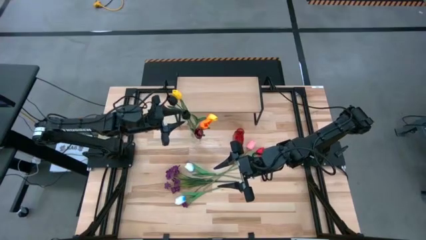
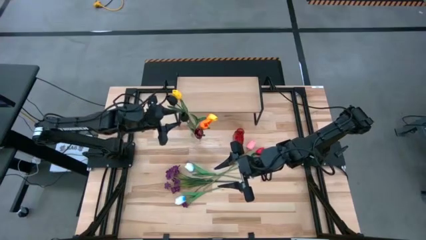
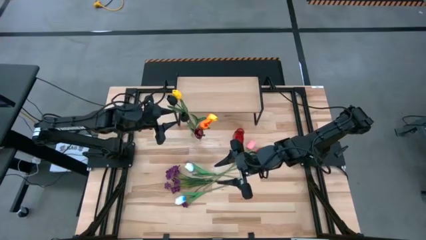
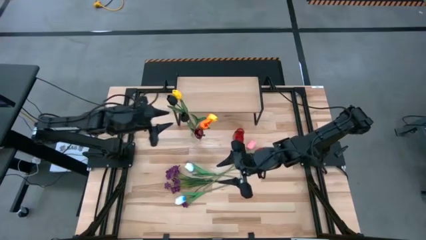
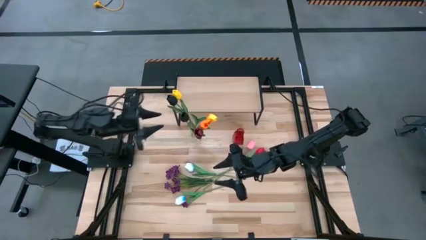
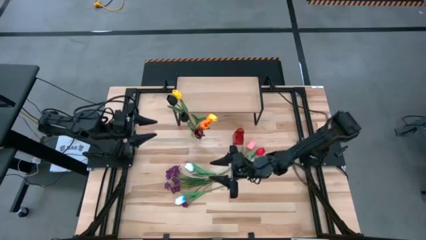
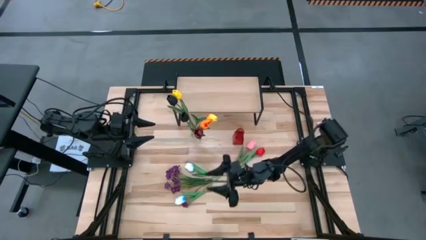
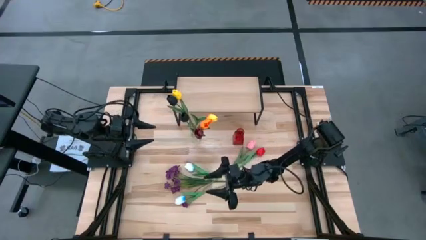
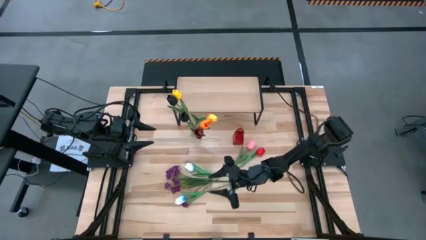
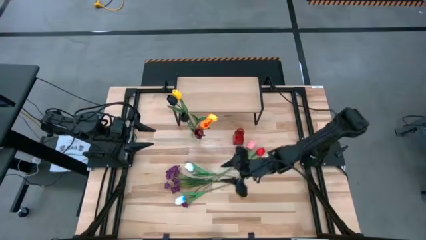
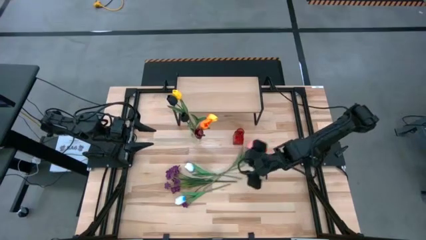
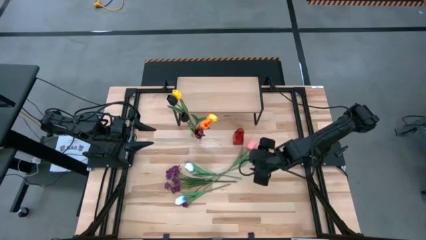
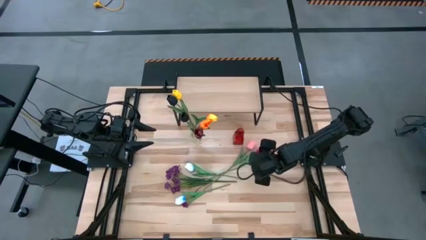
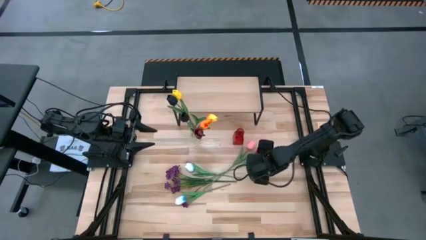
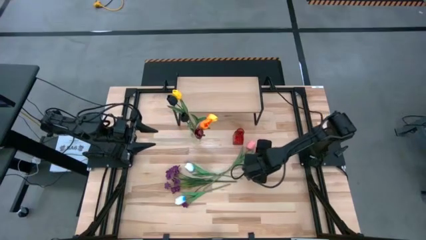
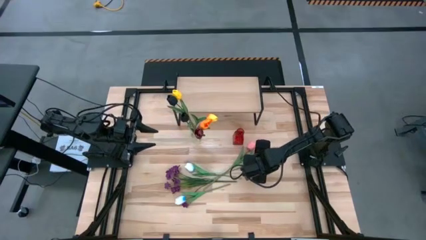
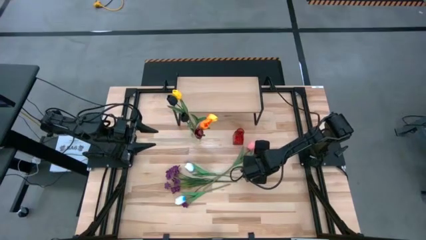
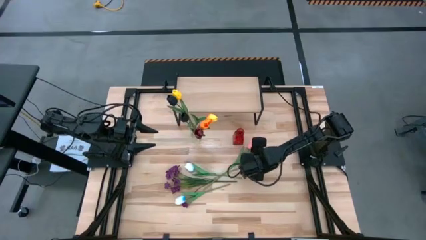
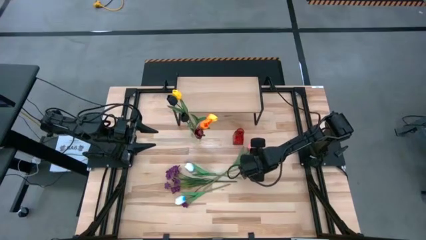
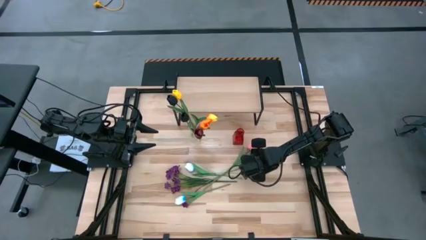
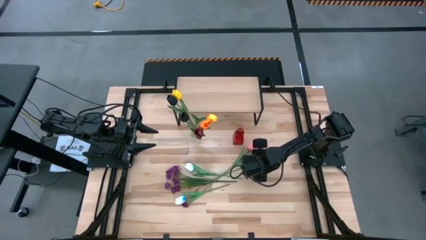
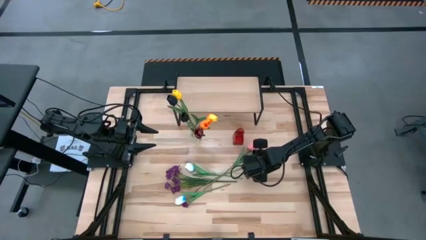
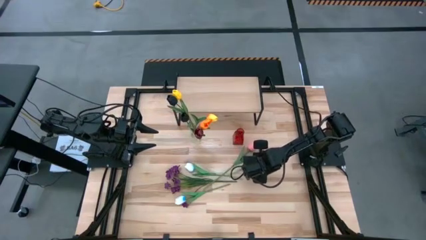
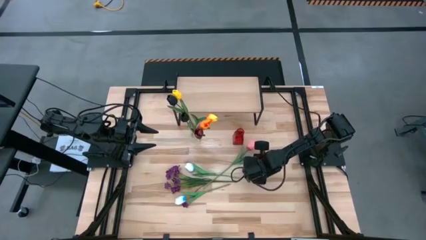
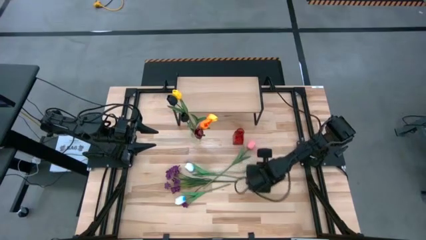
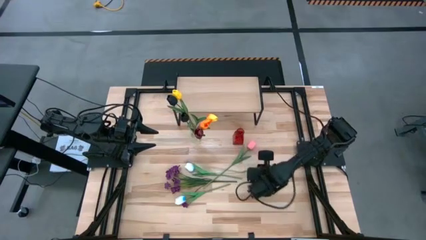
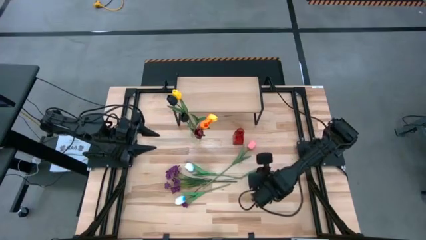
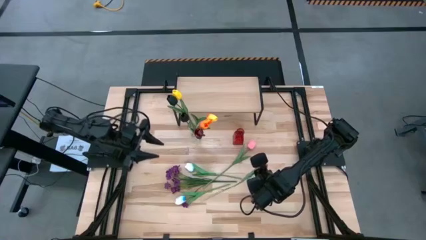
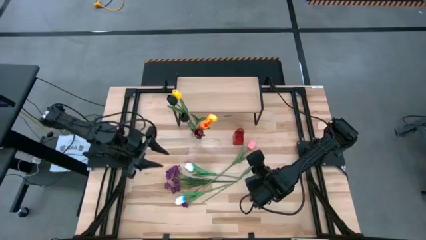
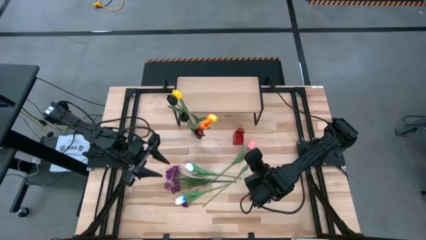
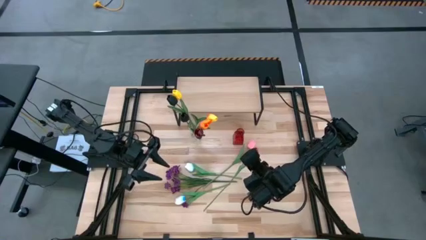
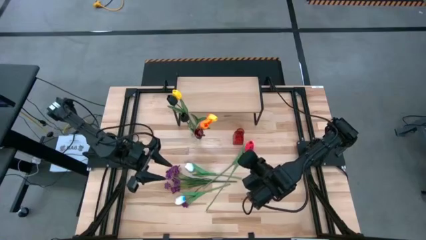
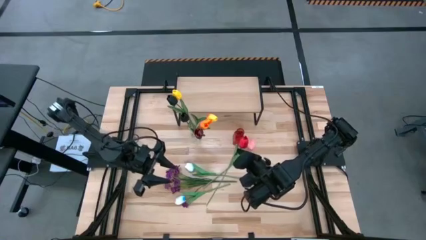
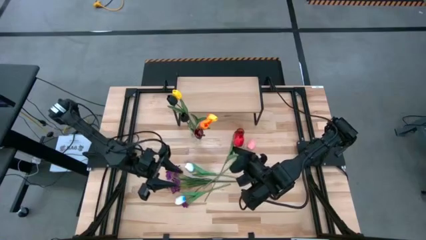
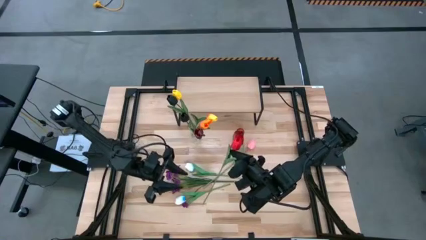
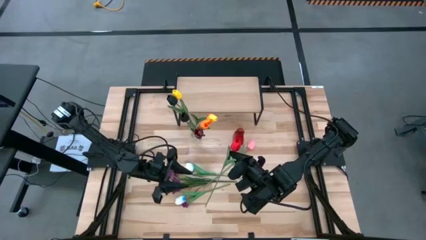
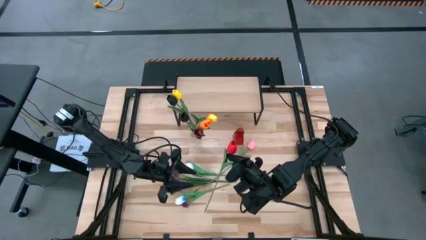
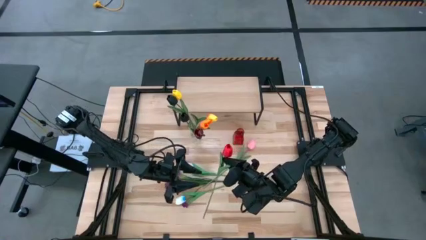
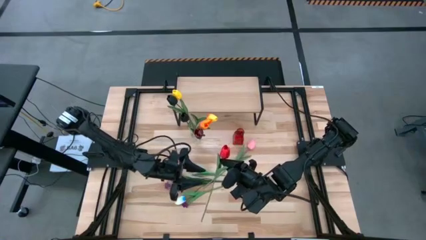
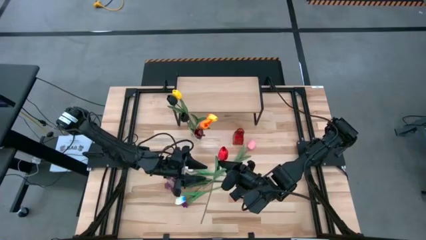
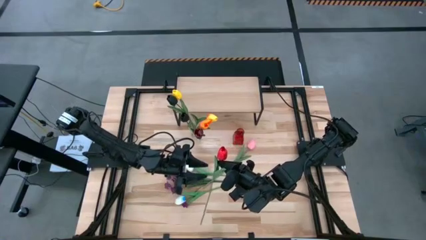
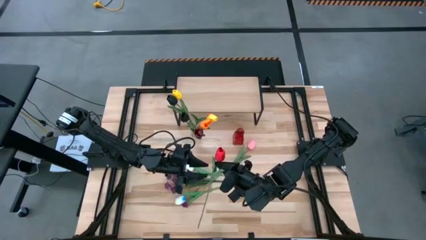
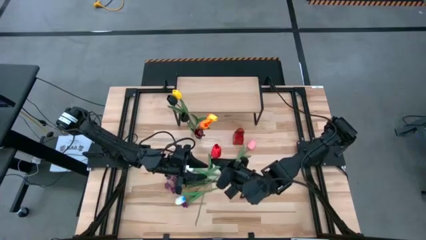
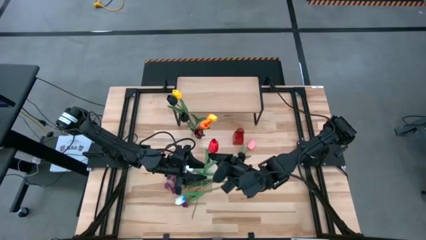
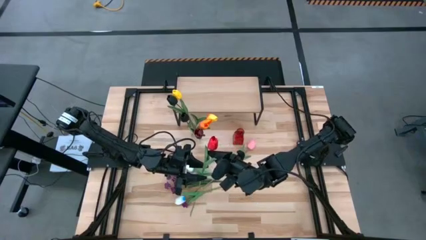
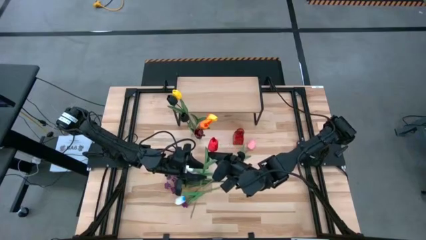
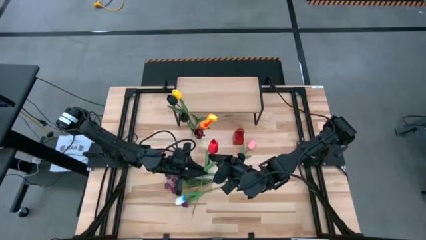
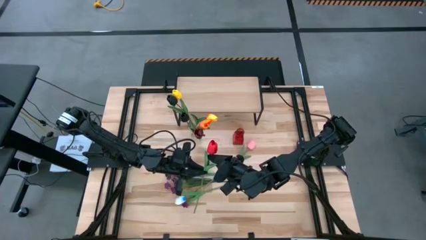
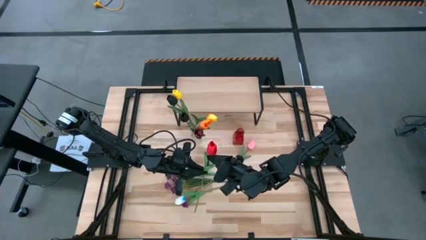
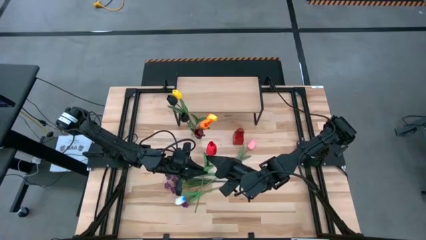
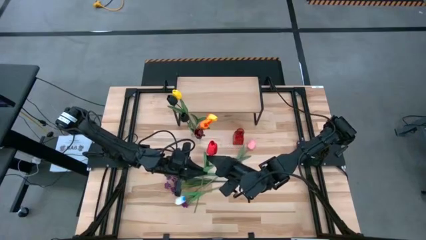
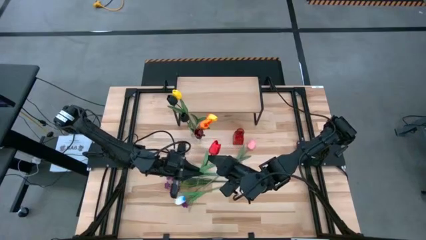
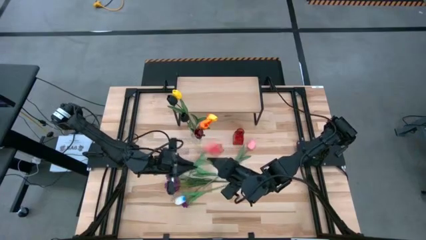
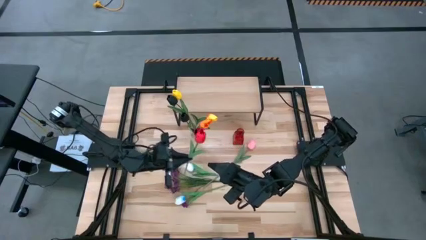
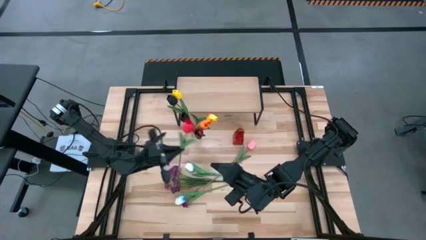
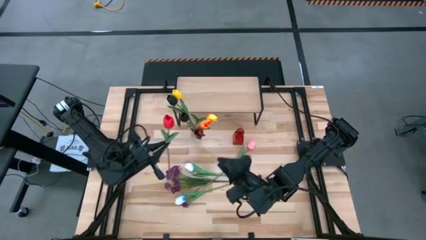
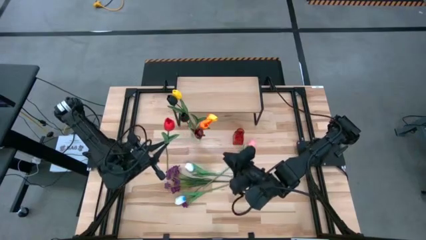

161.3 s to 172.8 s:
Task: Pick and place flowers into a vace then onto a shelf
Put the red tulip into the transparent vase

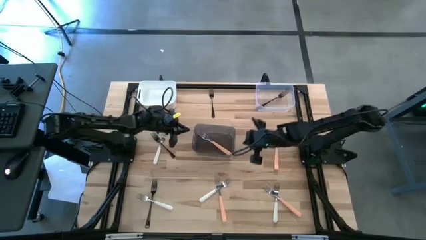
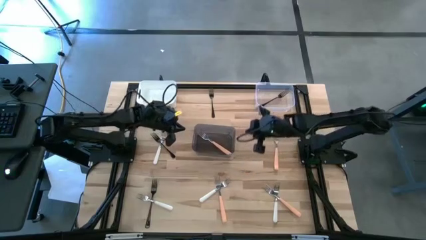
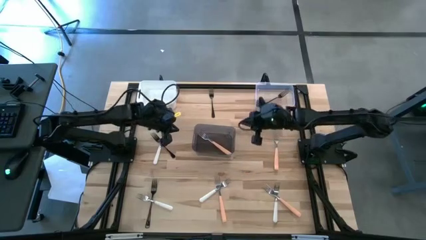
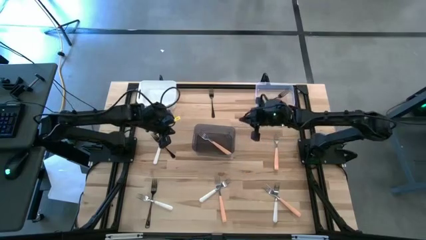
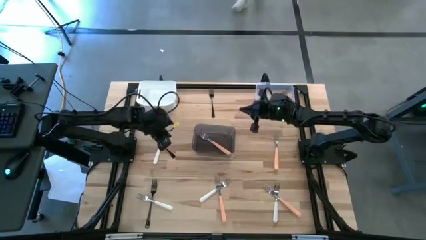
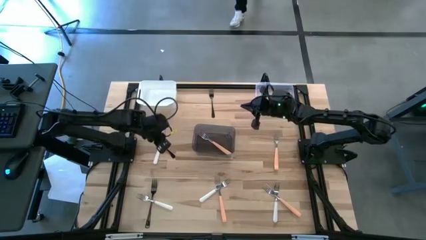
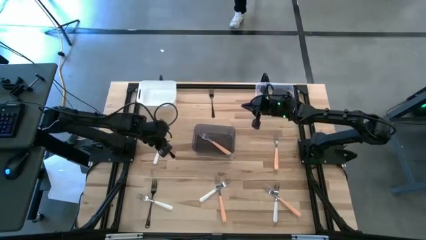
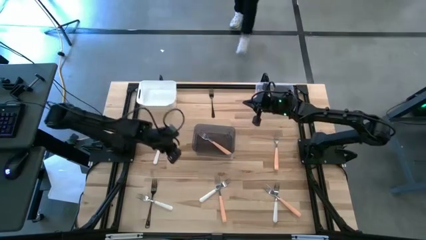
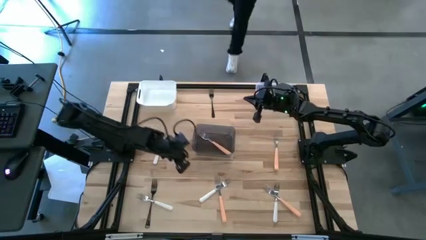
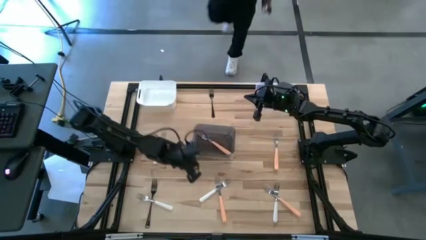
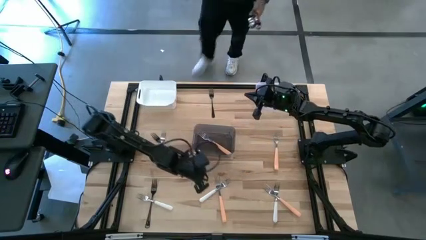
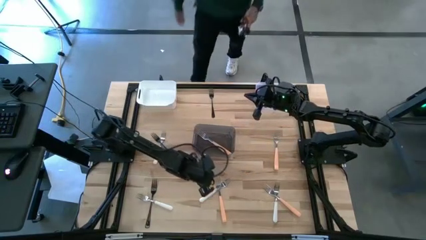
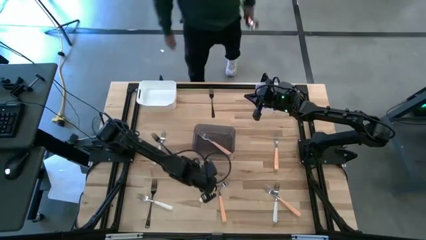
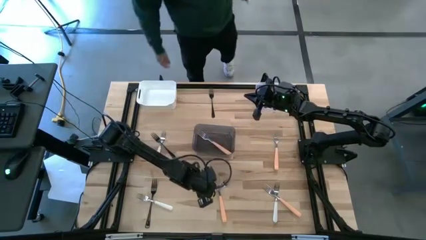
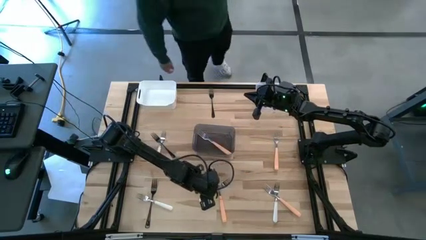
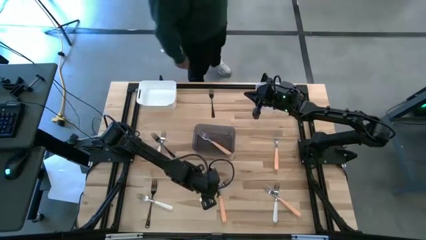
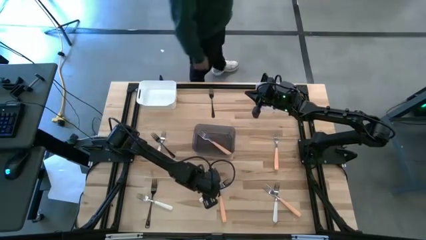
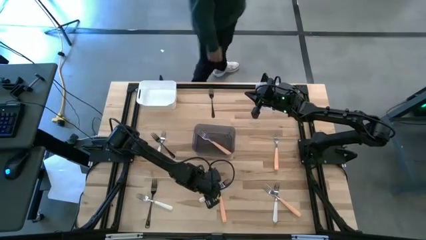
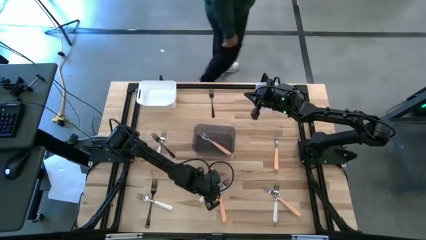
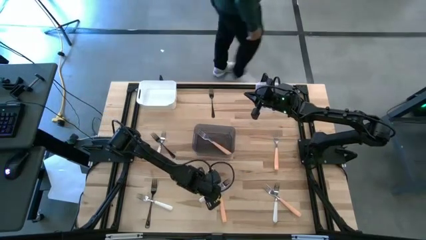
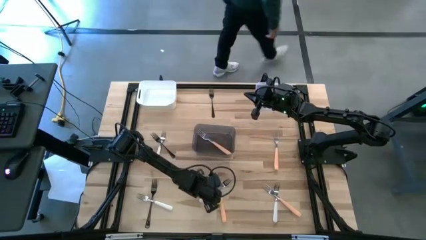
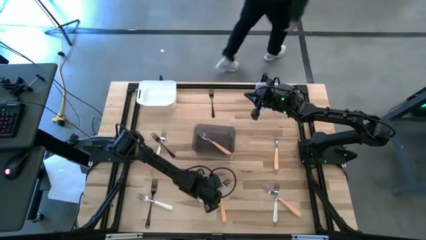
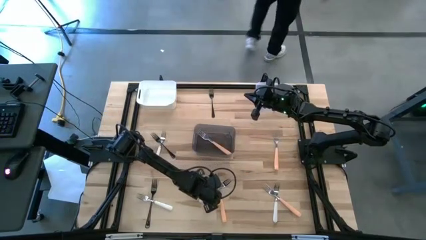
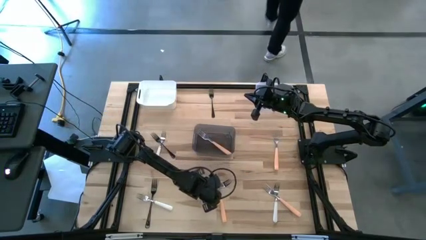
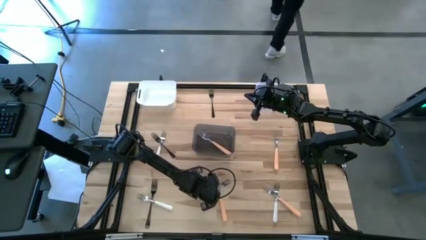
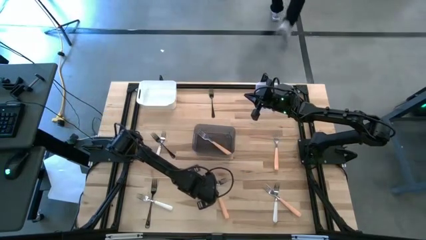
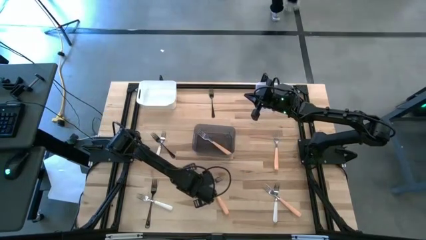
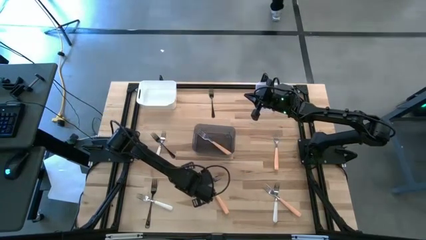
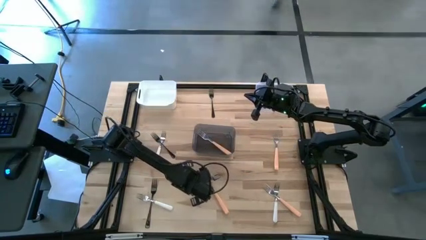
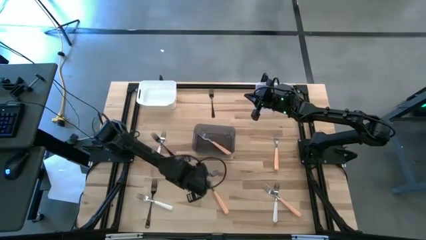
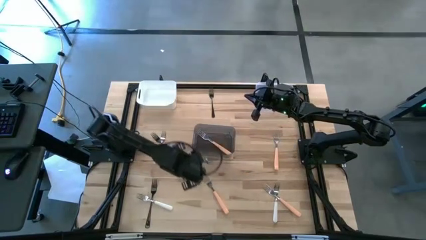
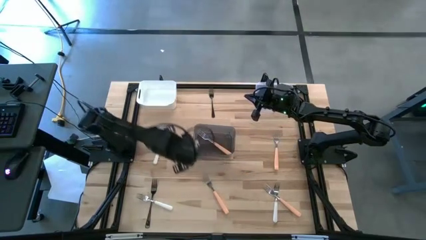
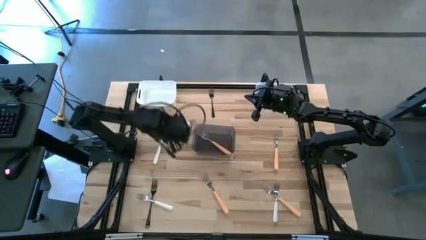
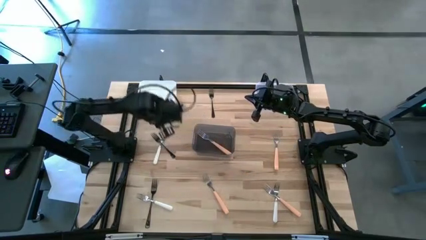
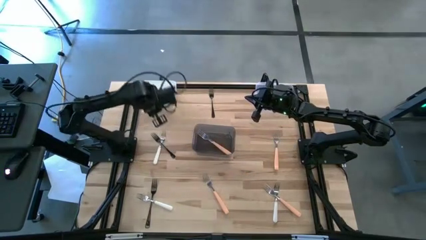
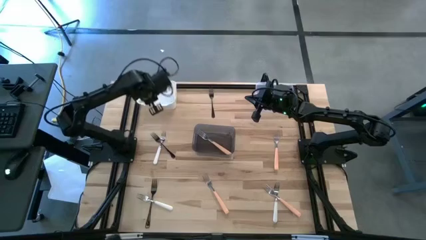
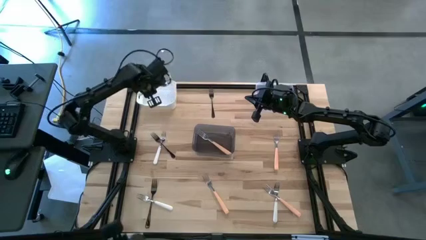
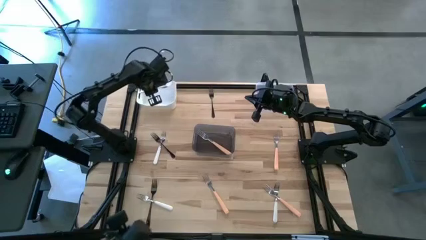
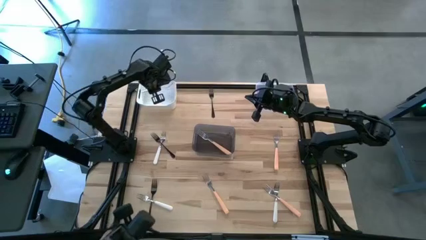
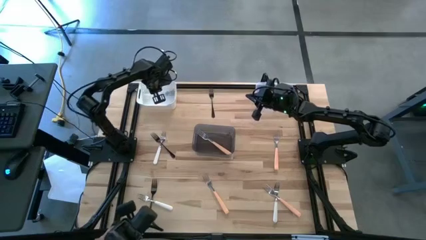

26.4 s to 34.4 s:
Task: Sort silverware by color (type)
Put the middle bottom white fork into the white bin
